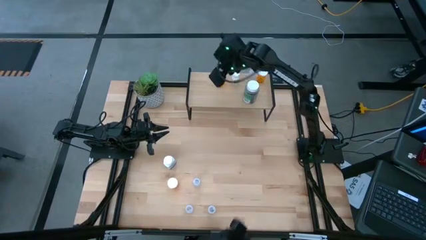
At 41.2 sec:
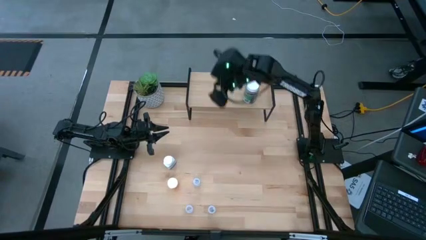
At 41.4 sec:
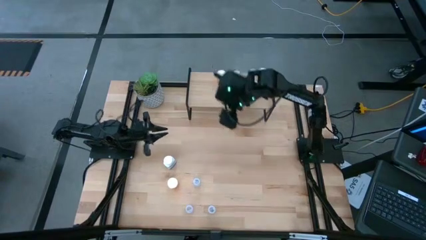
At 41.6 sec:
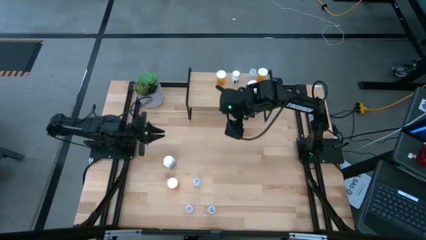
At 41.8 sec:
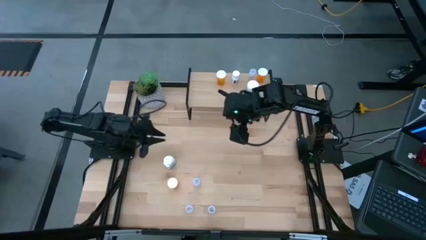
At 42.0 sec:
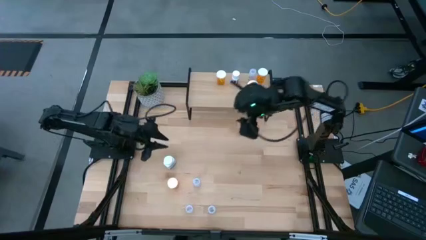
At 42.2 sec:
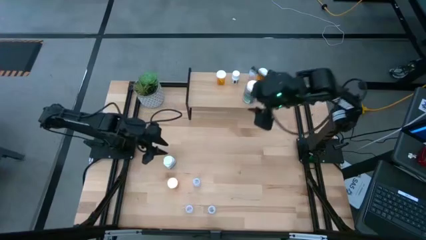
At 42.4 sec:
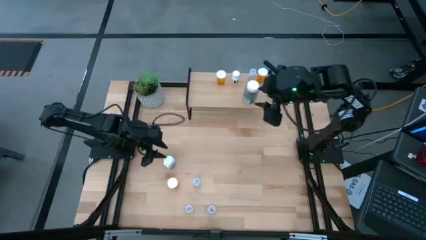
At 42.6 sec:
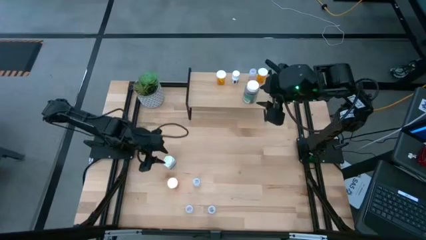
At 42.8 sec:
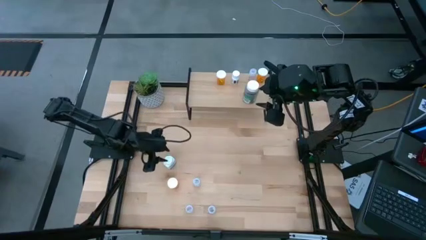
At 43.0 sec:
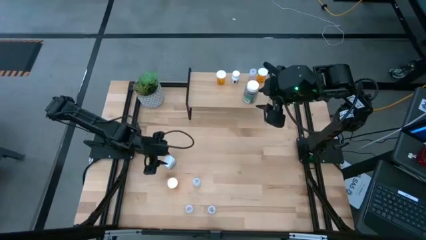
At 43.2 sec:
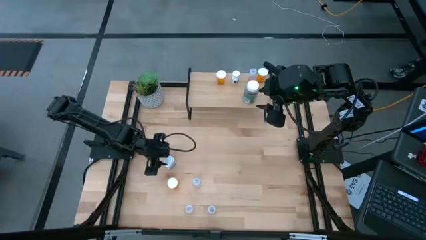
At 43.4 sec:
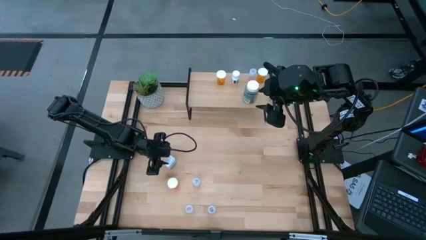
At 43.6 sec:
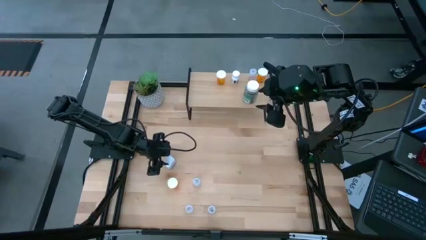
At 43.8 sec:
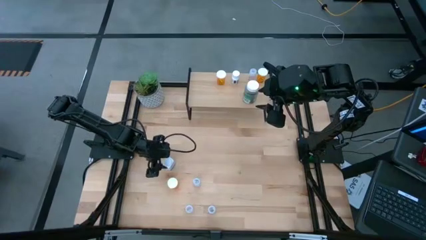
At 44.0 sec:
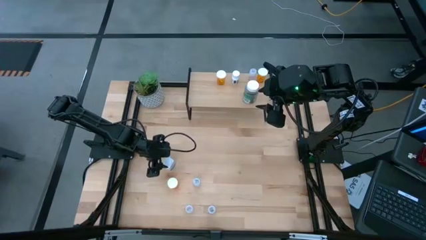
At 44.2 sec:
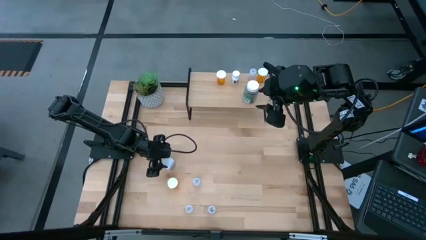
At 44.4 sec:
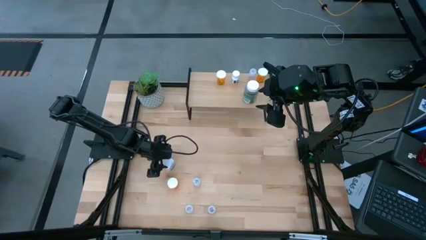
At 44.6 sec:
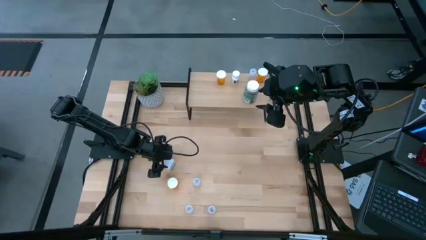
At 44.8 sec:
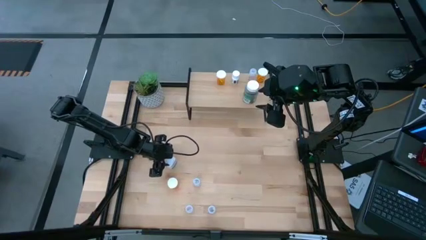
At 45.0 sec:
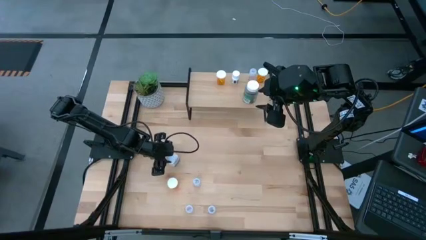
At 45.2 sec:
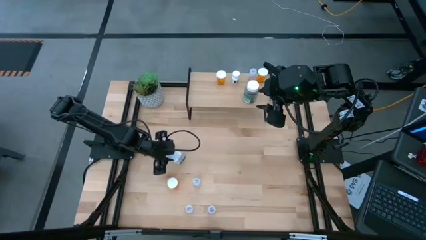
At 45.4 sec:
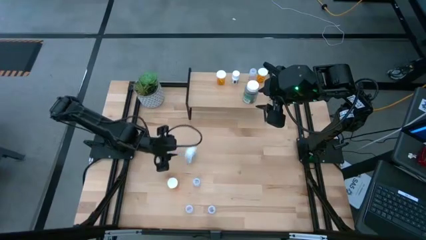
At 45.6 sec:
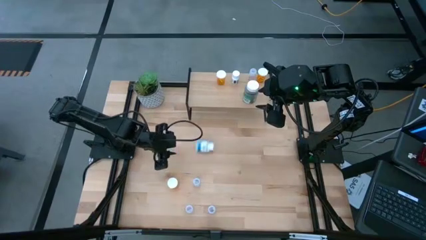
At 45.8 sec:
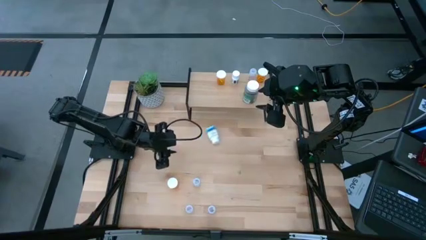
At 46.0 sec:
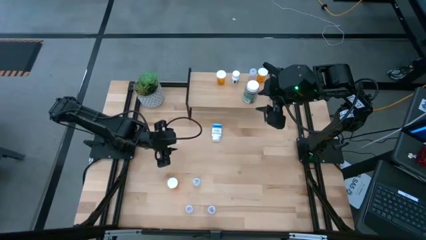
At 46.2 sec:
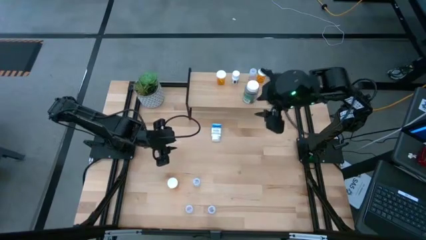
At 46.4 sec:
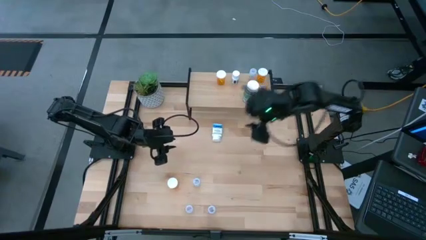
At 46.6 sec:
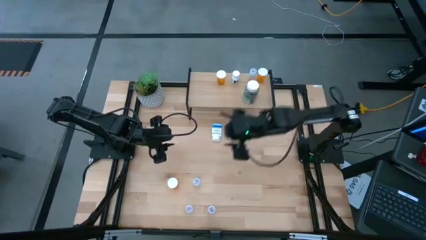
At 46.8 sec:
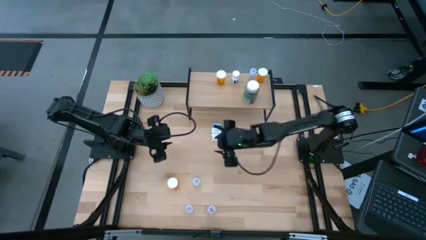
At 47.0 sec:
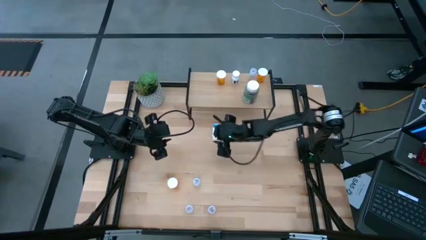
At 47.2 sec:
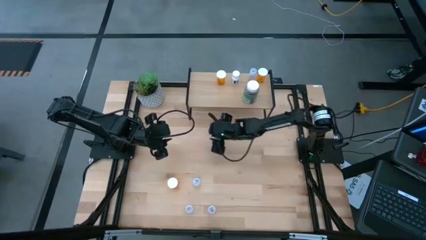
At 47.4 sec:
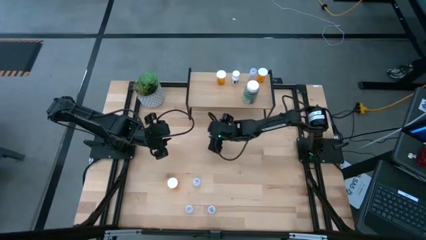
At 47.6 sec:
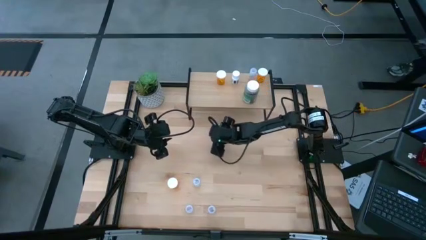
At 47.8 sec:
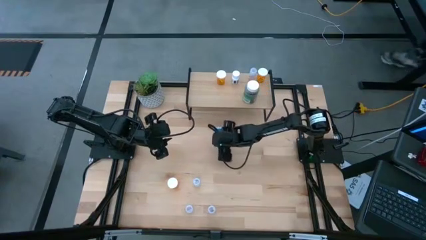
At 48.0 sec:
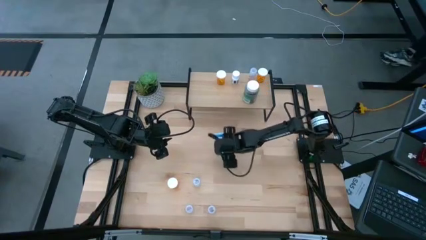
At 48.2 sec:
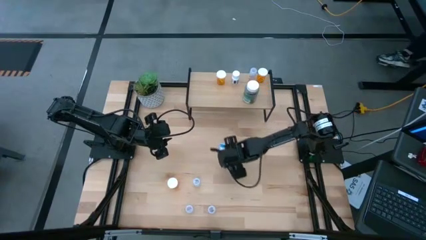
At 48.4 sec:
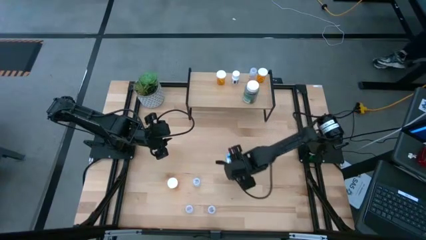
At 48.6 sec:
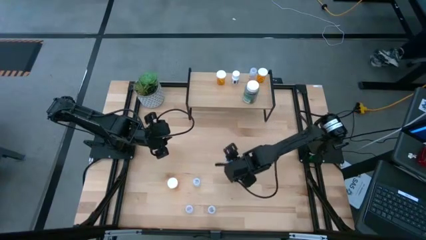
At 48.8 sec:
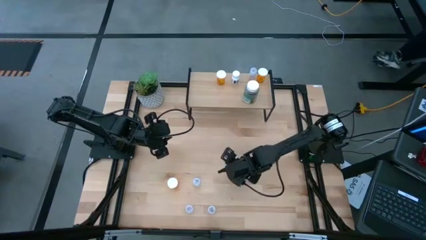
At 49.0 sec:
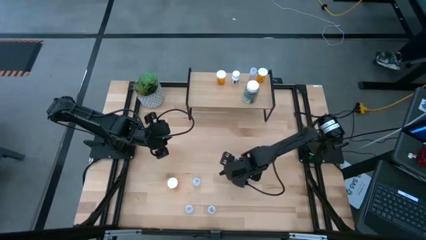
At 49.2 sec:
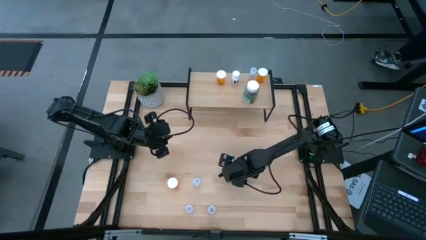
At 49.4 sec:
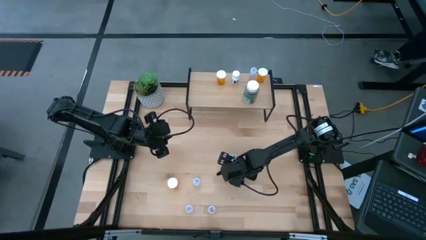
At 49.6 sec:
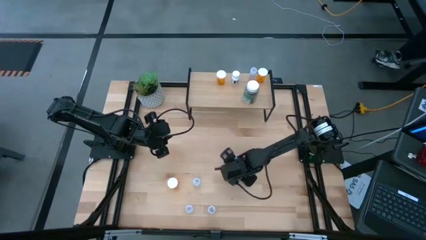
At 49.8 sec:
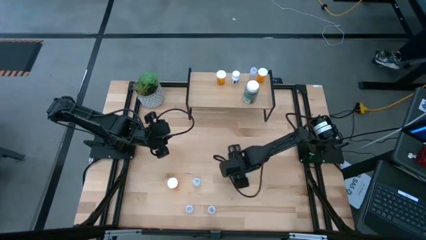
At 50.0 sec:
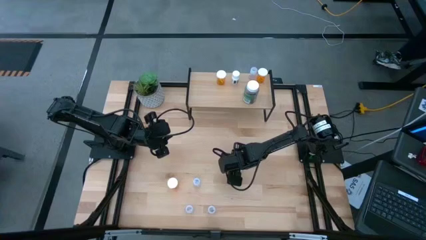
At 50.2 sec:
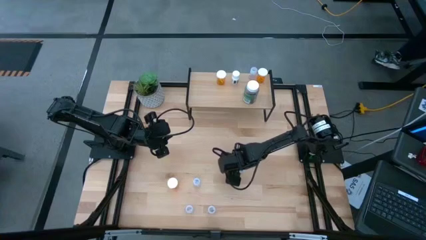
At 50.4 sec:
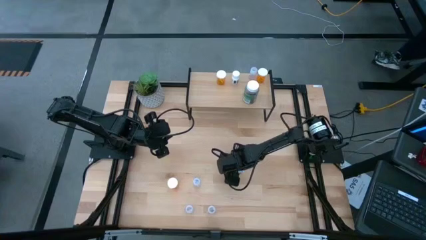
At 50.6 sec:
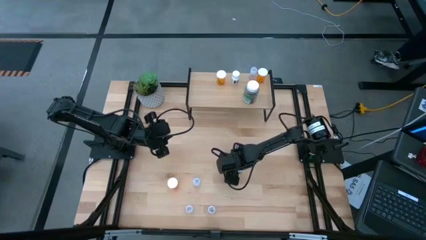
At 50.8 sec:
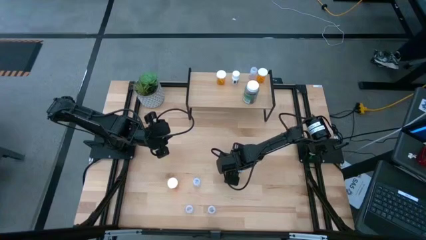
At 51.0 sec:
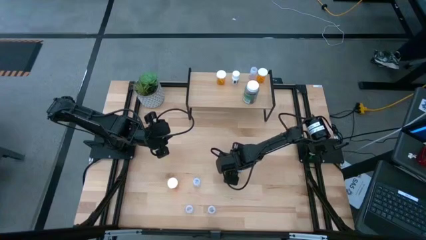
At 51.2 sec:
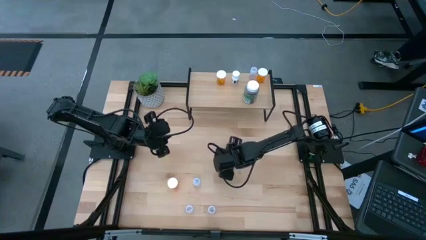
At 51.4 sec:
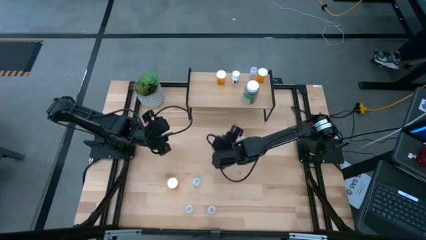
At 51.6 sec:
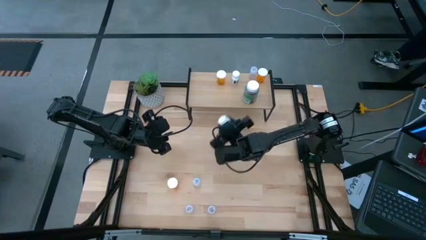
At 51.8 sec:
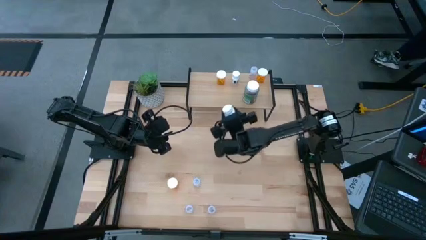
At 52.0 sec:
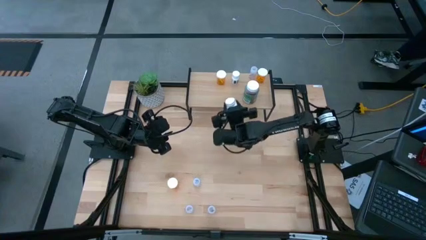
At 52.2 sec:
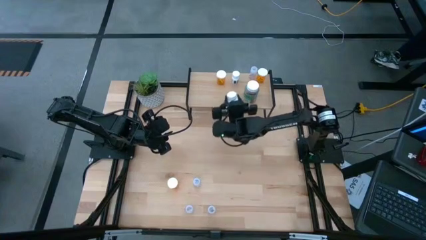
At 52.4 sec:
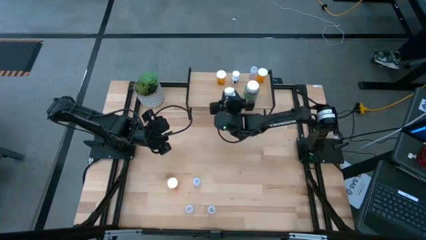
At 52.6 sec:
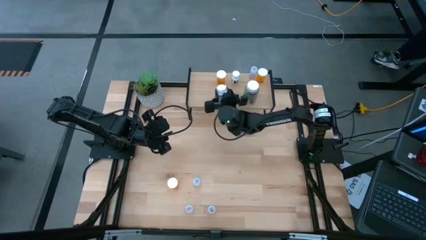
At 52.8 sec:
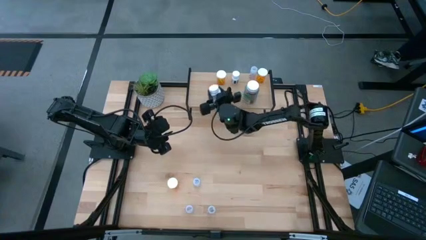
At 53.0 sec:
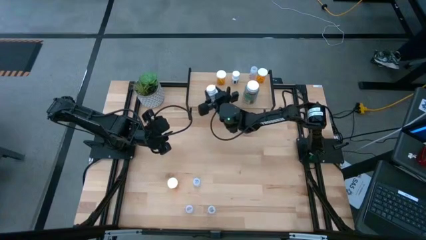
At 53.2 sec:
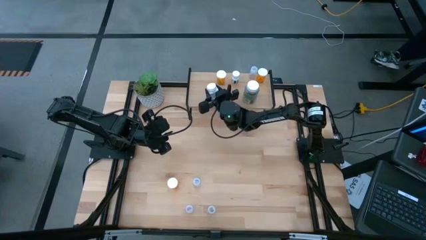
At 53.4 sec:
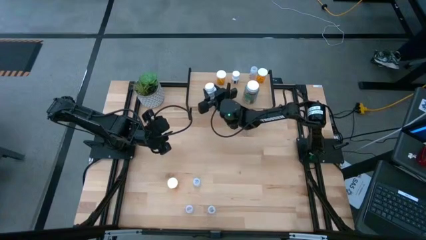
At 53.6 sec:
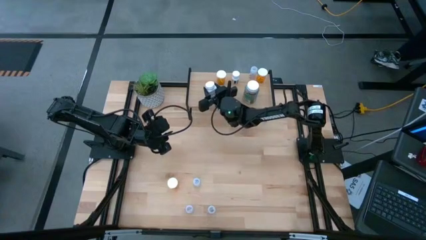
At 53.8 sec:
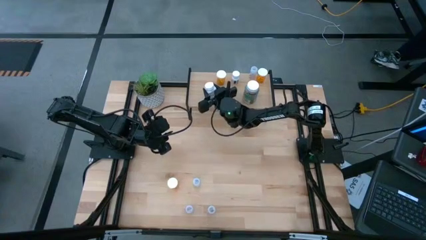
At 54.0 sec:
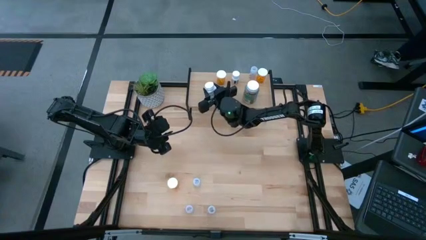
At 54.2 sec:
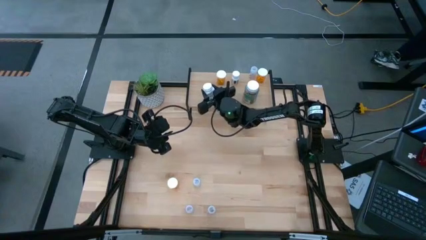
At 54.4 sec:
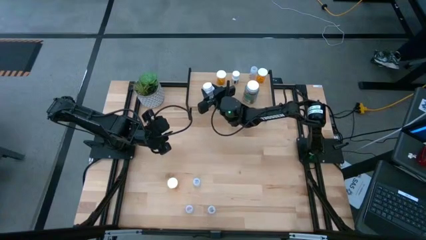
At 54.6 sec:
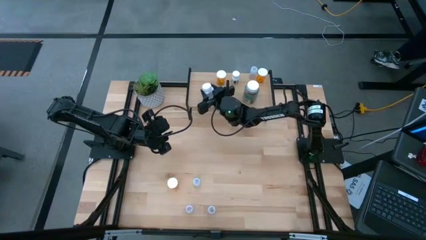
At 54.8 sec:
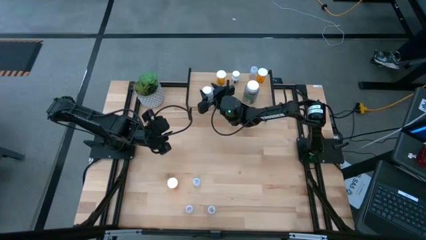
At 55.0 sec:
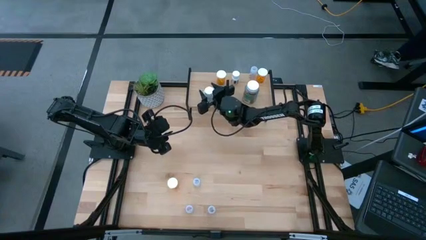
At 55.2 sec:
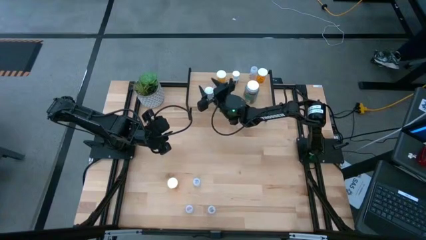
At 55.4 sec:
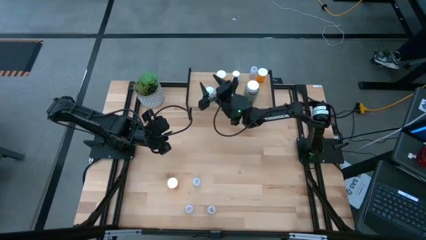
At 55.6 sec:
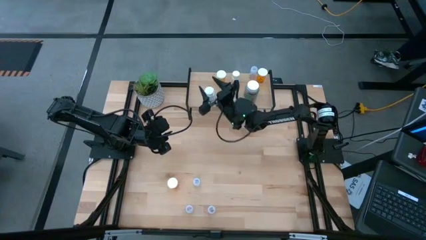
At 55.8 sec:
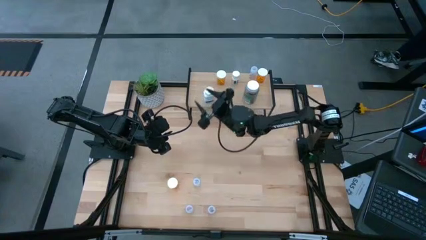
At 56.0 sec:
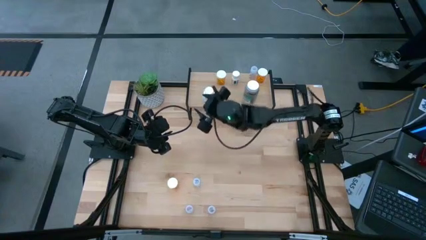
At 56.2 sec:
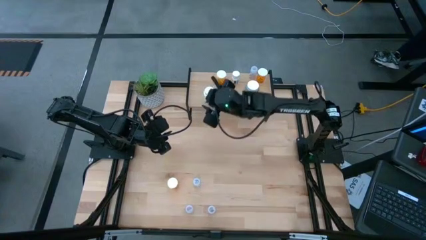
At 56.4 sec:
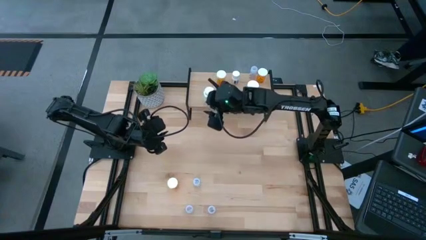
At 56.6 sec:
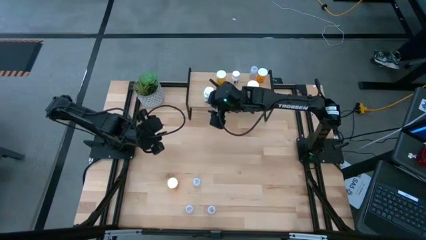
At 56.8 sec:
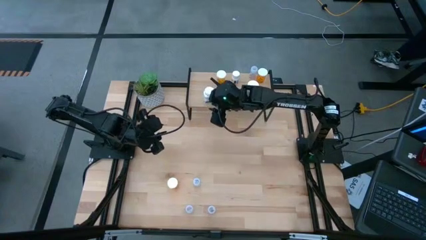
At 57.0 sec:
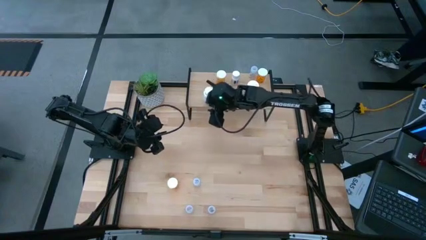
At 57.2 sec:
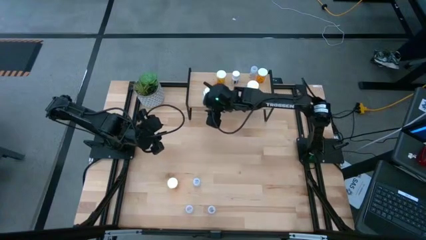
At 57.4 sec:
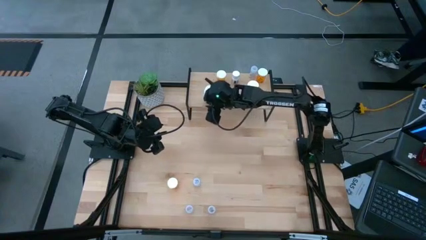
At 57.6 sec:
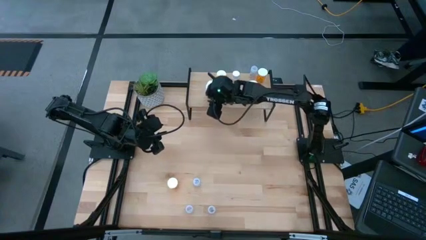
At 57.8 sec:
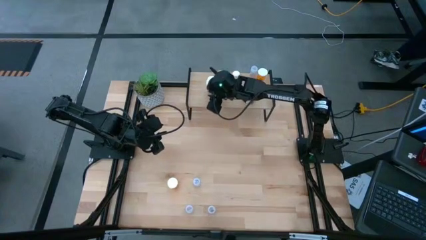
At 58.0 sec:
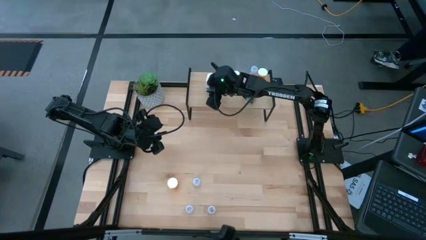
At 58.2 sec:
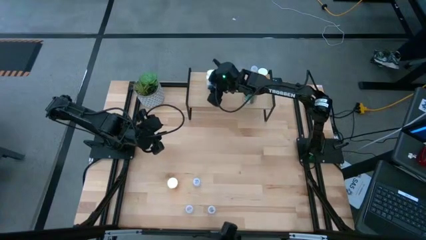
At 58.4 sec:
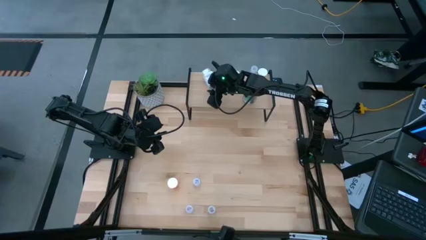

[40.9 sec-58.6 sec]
Task: Pick and place medicine bottles onto shelf by color
Put the white pill bottle on the shelf
